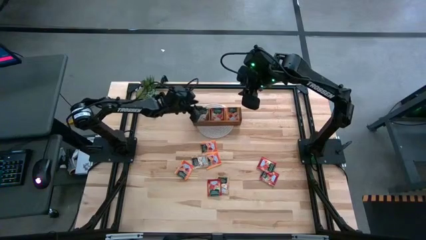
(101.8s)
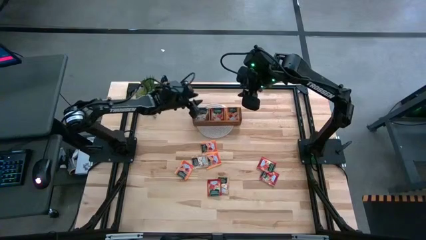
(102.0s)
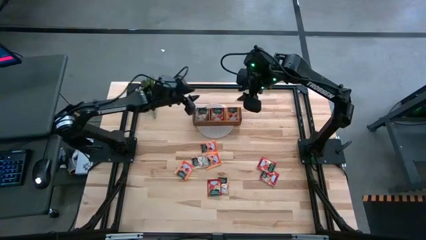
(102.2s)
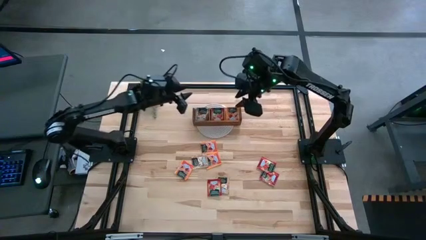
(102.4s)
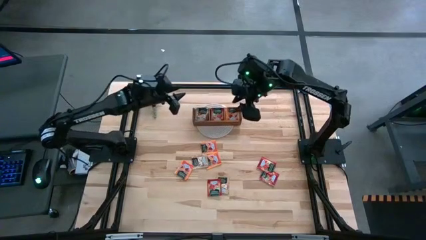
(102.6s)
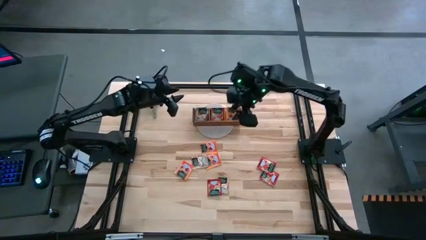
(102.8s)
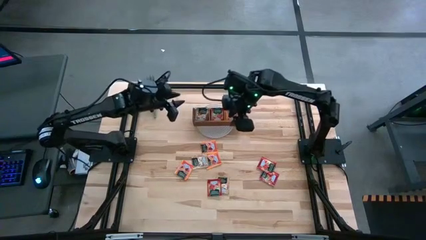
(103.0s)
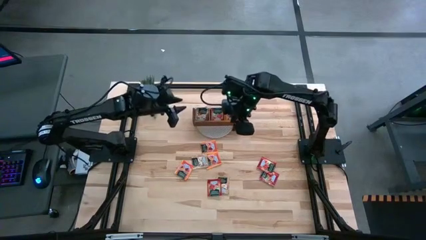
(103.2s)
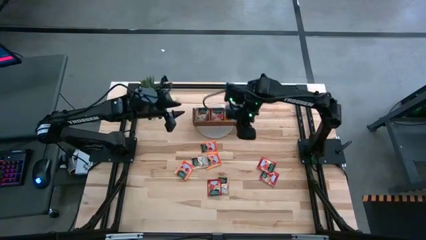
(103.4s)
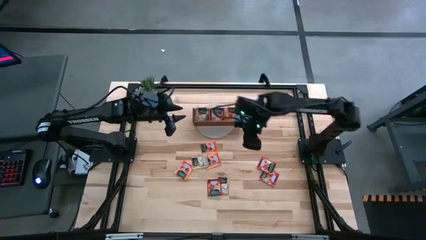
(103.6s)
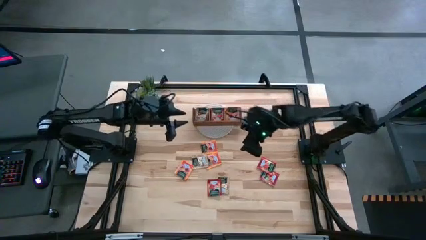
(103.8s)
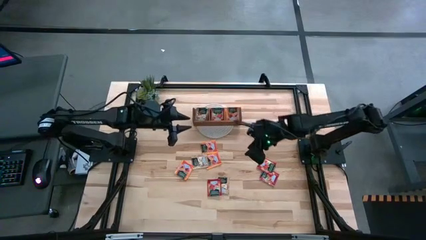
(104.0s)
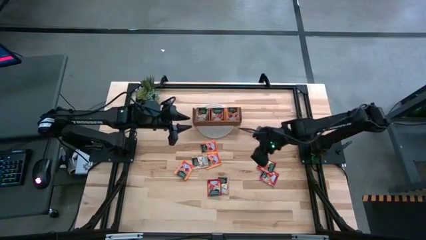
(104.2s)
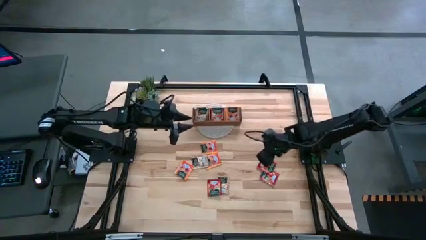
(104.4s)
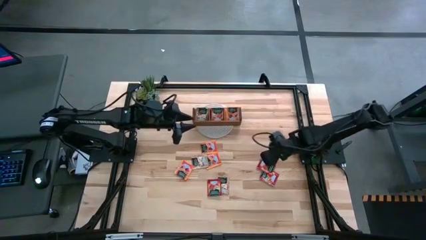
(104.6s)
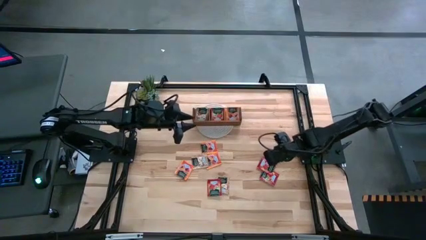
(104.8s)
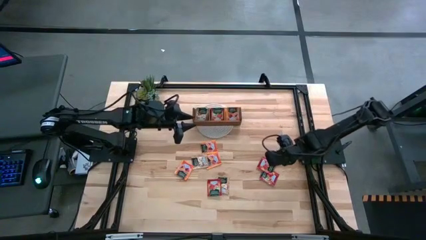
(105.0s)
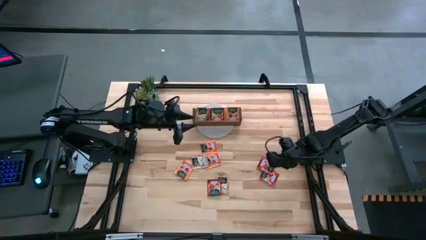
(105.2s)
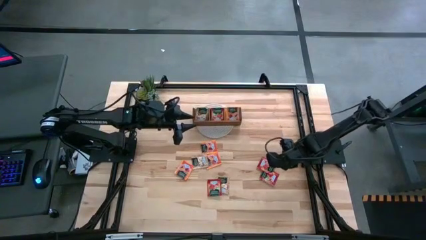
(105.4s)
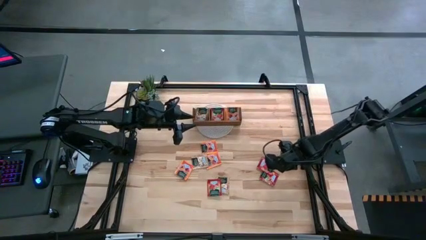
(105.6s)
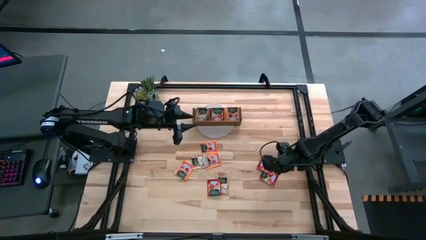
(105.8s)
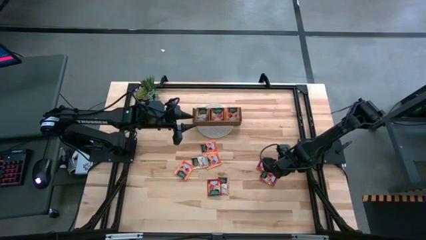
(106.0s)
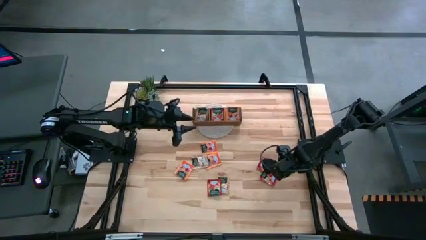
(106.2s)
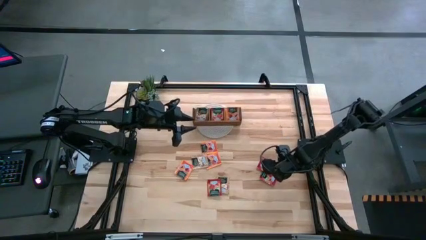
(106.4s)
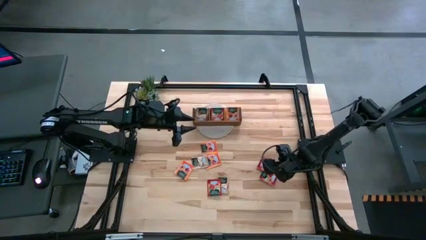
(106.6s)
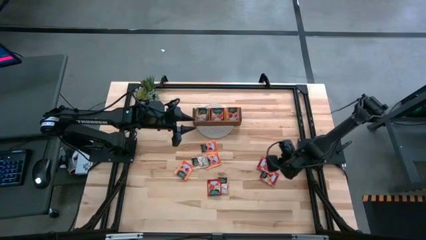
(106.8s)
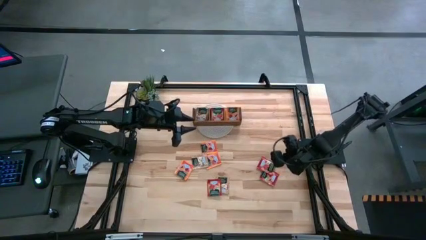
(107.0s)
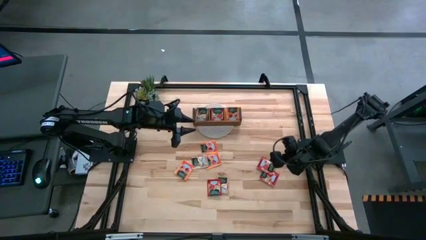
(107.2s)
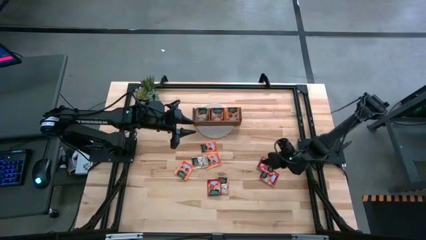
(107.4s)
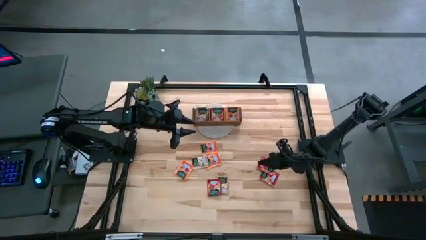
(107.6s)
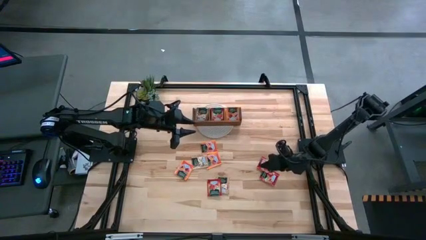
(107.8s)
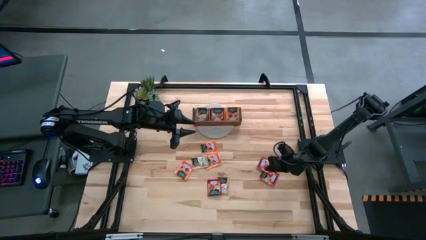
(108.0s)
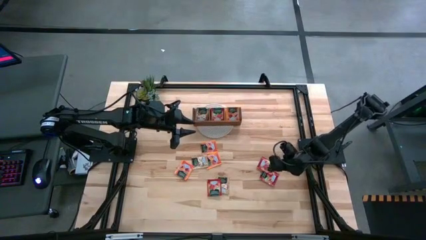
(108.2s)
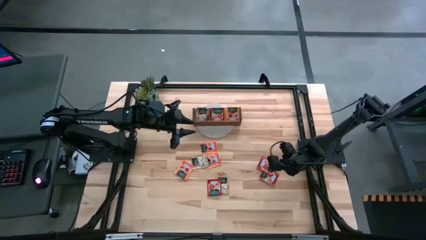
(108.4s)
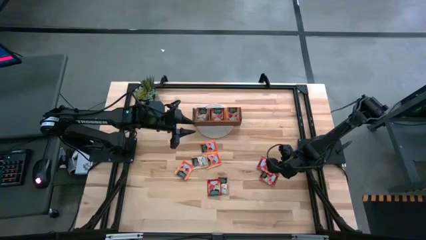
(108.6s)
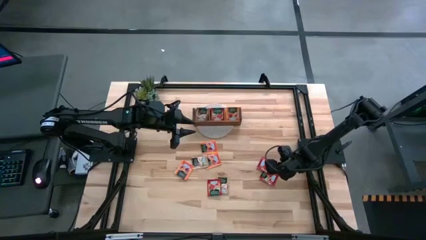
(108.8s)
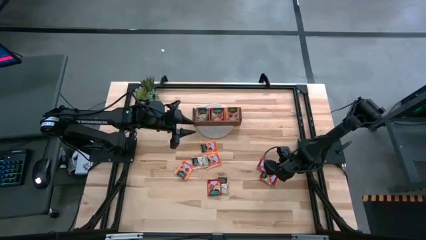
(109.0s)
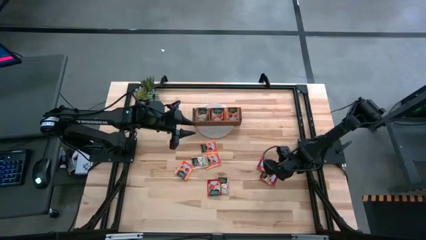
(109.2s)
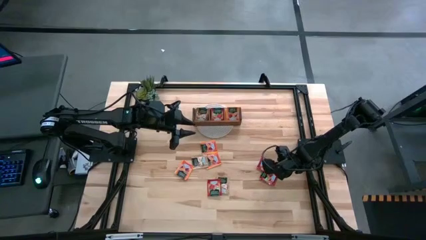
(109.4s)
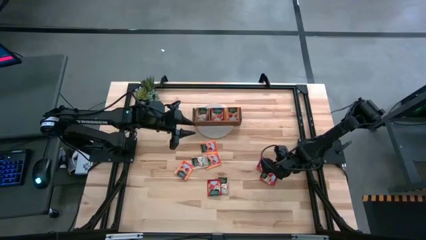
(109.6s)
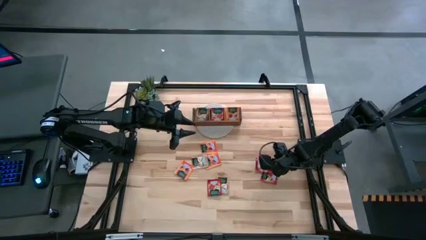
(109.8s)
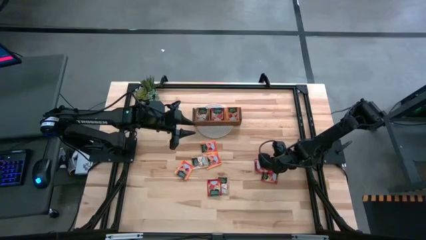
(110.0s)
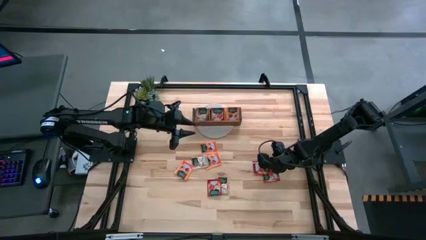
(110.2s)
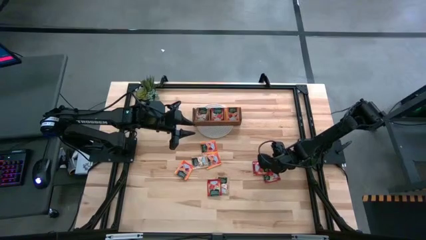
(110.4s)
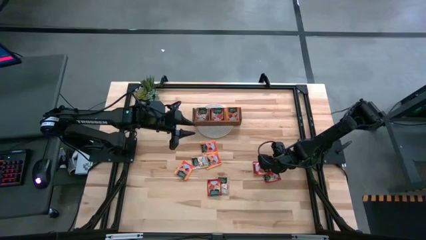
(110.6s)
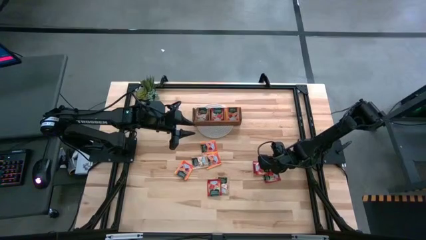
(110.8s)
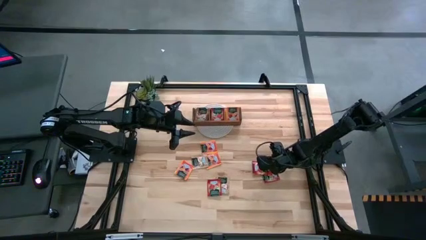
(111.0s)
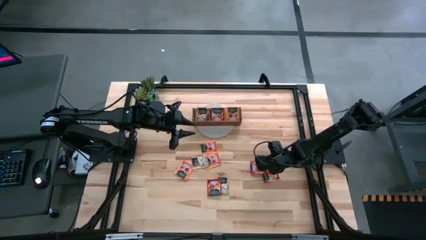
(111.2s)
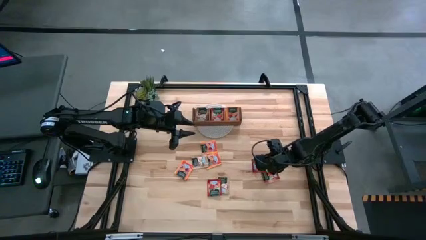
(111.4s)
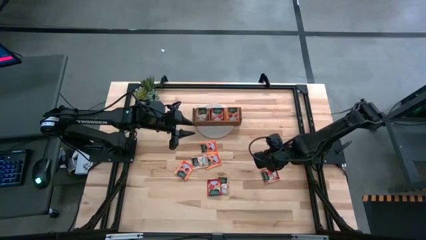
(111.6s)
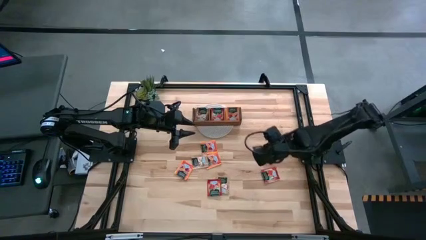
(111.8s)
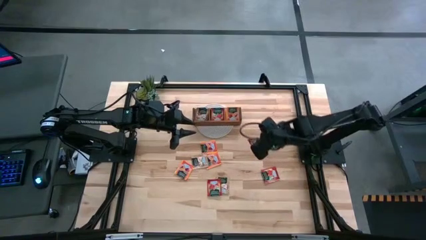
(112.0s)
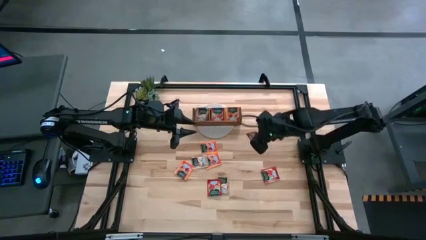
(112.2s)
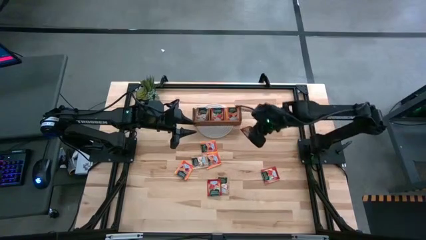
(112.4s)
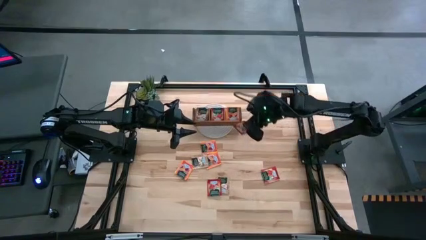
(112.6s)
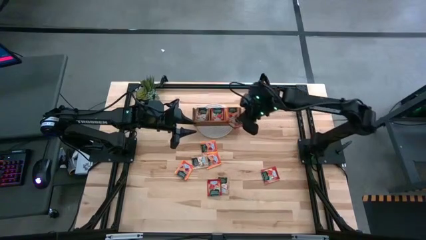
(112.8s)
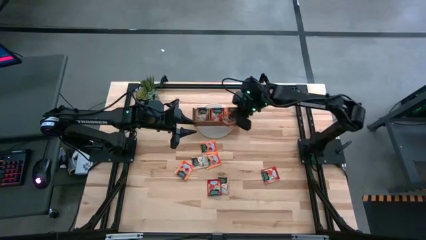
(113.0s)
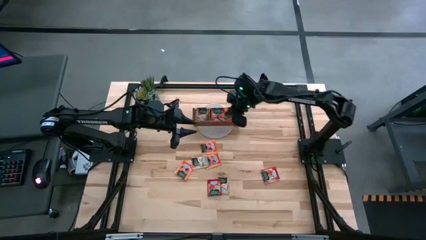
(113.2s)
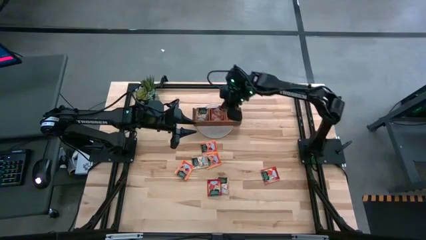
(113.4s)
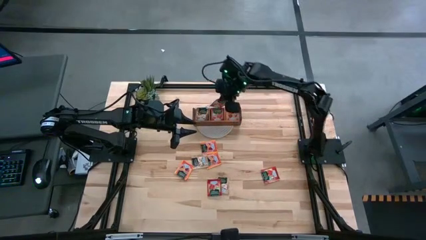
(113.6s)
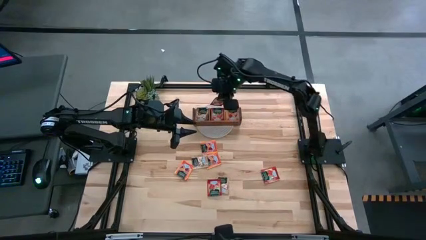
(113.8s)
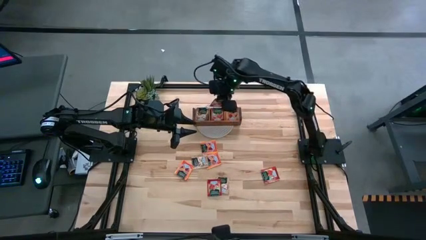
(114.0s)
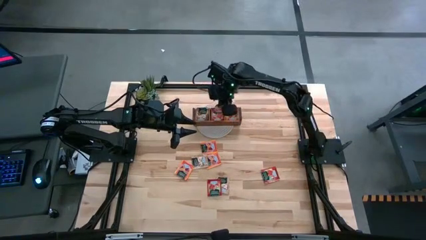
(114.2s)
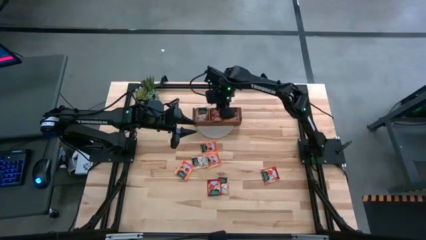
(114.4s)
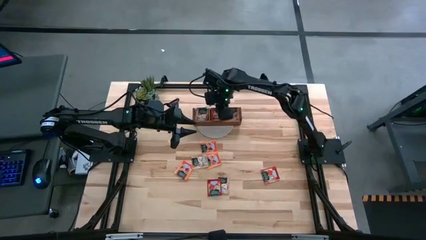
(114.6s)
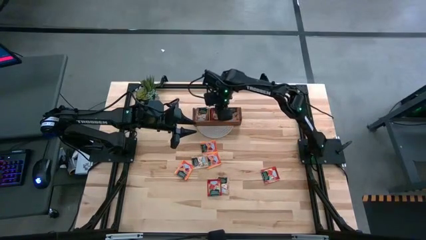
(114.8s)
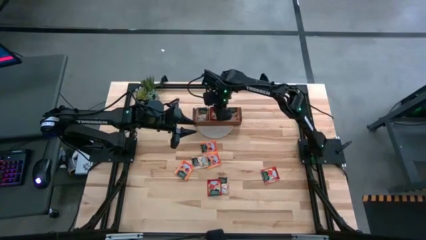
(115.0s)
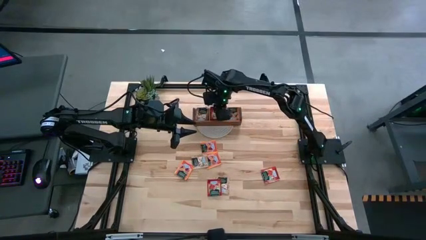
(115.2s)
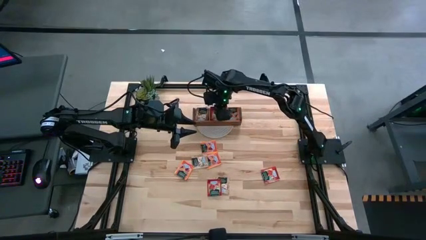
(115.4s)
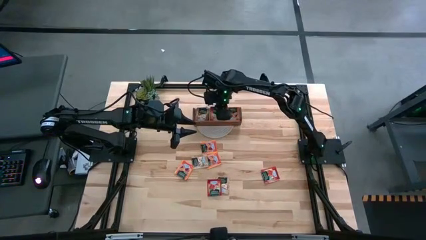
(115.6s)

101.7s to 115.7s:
Task: Pick & Place Tea
Put the red tea bag in the middle section of the wooden organizer

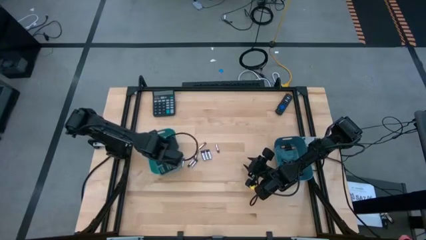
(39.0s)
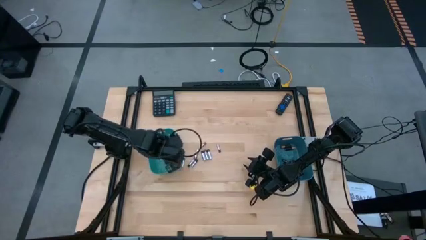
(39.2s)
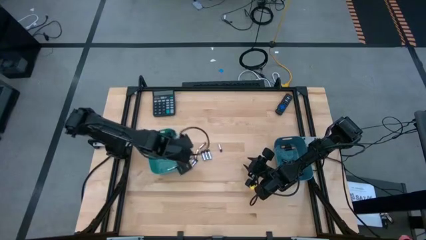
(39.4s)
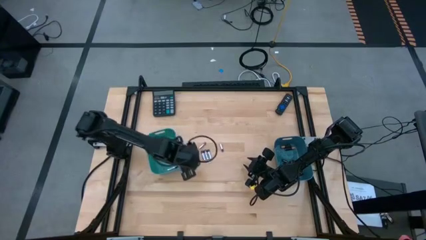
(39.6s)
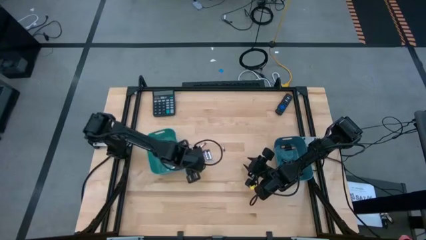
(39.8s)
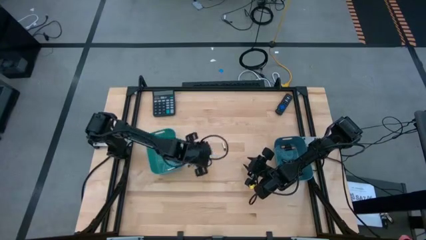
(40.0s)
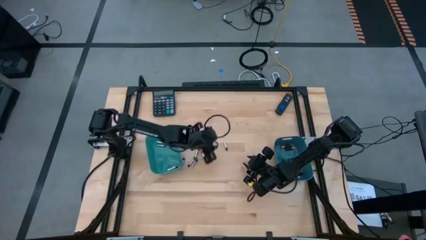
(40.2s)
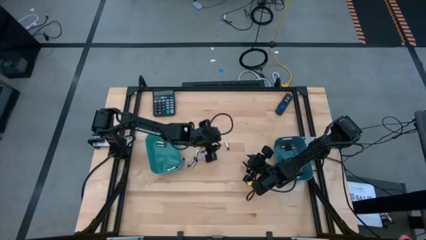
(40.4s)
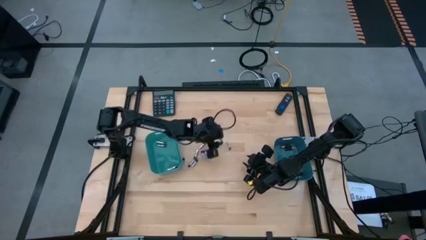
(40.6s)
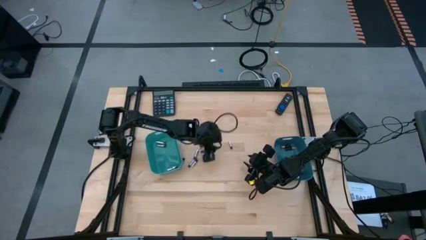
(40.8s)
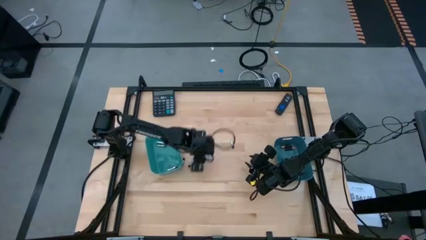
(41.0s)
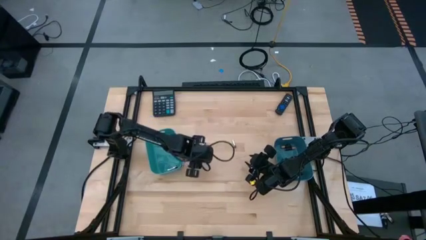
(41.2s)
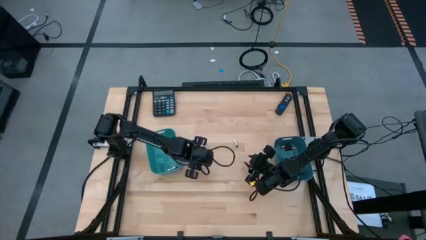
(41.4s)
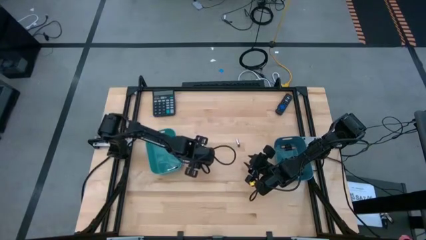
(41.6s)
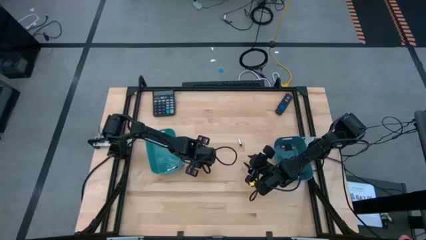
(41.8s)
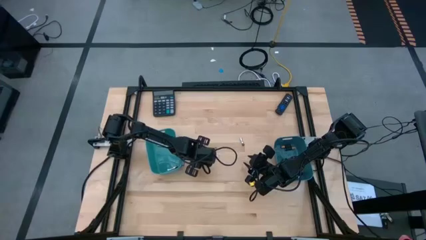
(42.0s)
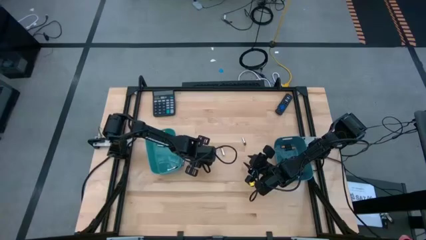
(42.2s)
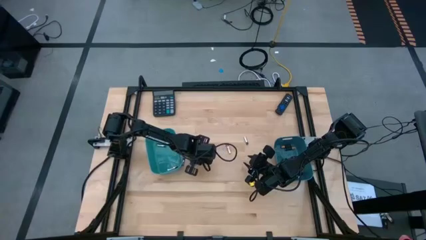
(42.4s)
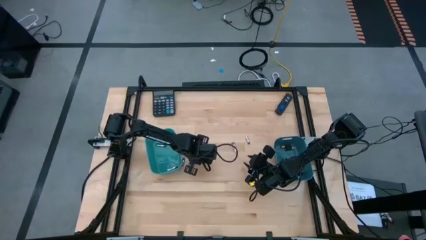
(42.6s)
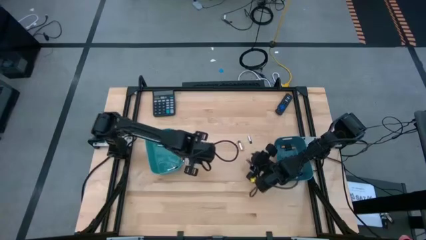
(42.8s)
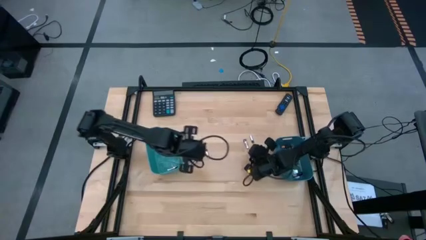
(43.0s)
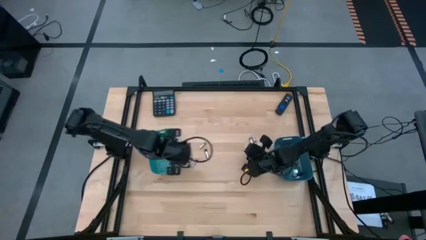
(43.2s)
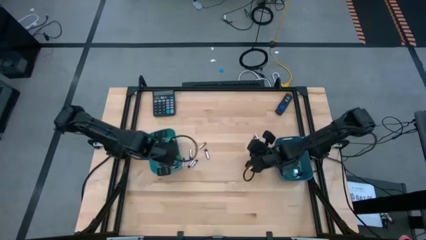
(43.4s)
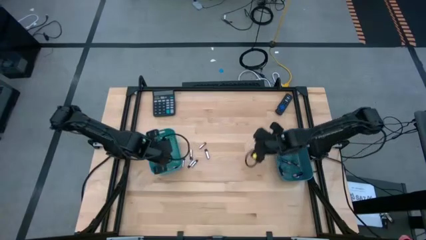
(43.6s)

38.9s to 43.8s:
Task: Sort batteries
Put the white battery into the left blue bin
